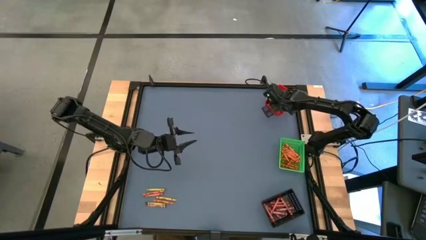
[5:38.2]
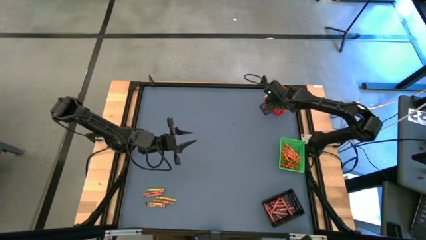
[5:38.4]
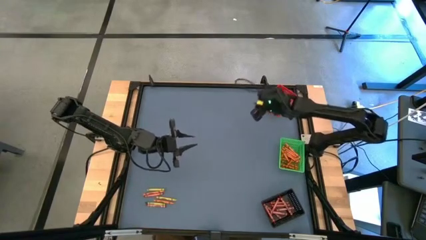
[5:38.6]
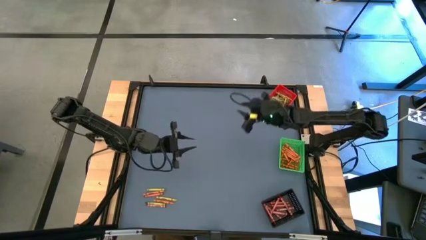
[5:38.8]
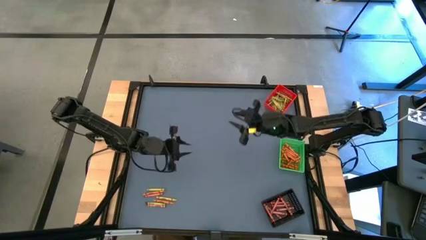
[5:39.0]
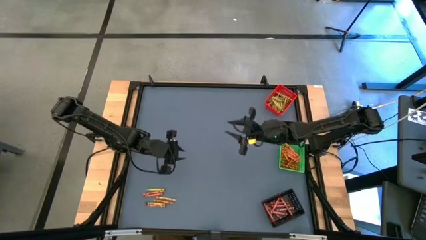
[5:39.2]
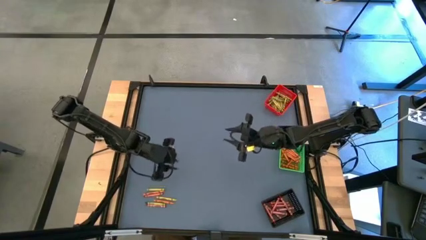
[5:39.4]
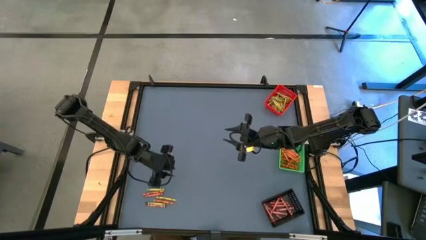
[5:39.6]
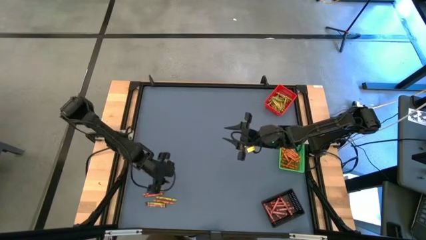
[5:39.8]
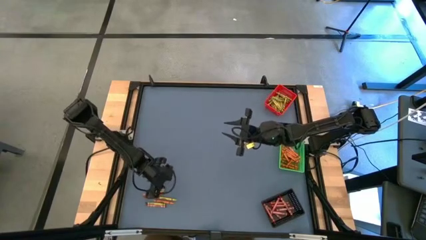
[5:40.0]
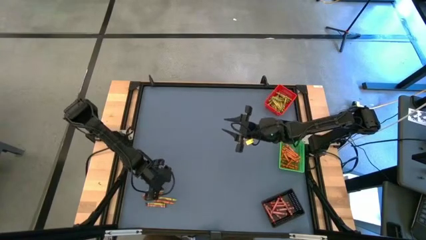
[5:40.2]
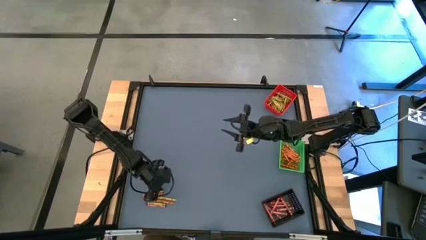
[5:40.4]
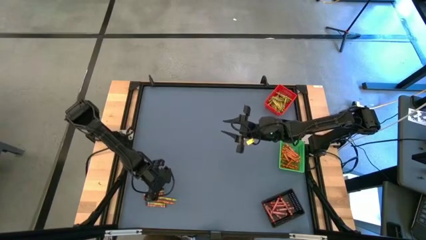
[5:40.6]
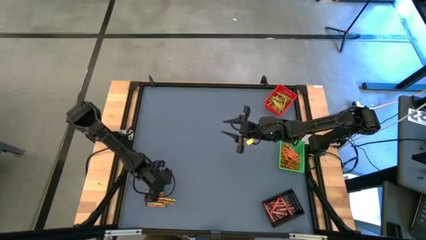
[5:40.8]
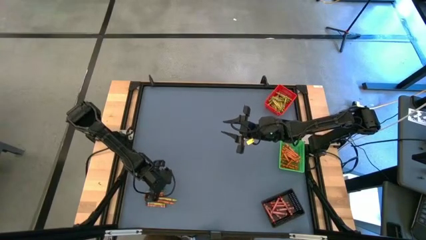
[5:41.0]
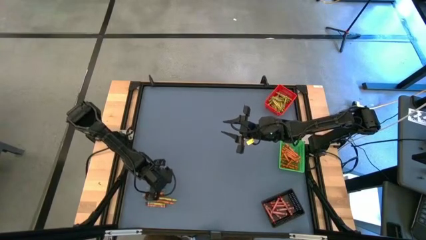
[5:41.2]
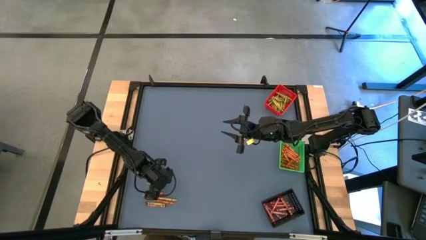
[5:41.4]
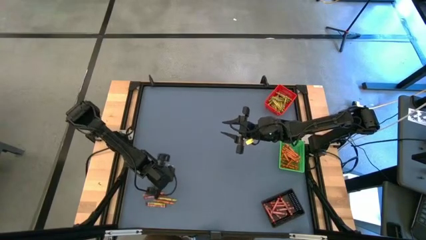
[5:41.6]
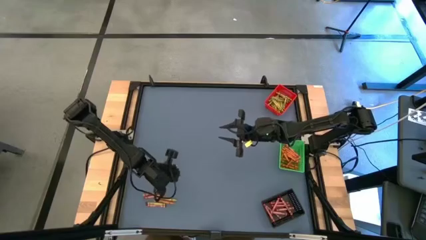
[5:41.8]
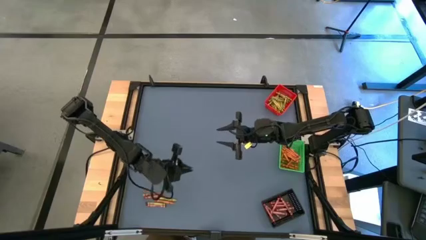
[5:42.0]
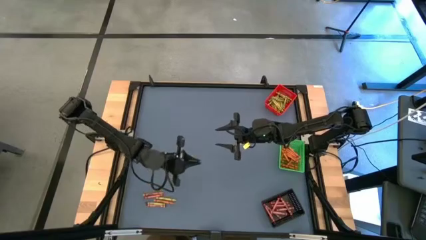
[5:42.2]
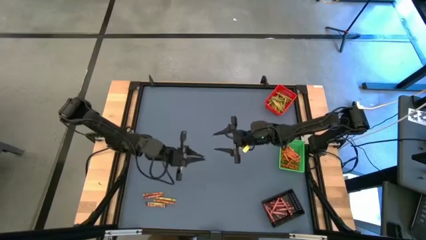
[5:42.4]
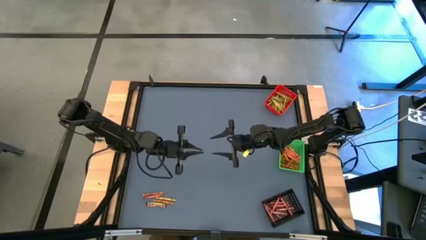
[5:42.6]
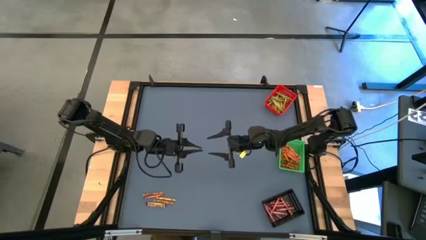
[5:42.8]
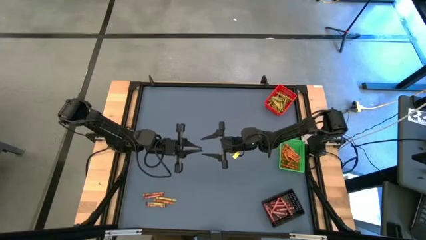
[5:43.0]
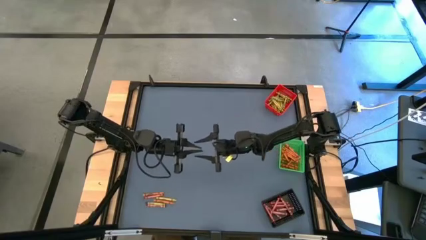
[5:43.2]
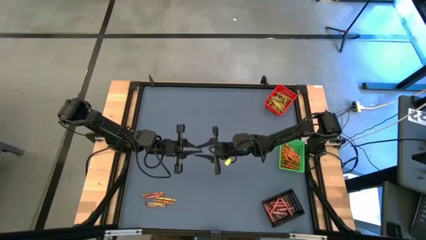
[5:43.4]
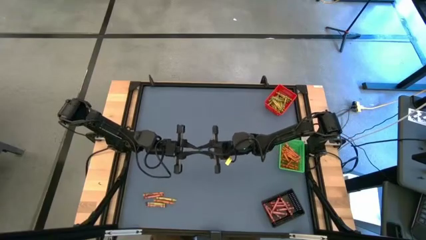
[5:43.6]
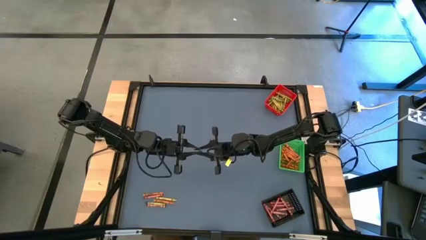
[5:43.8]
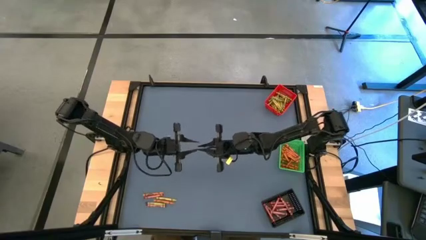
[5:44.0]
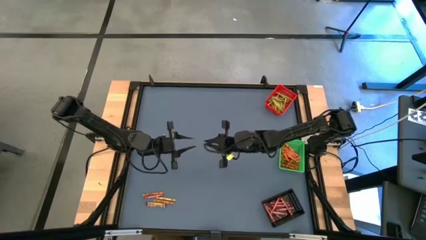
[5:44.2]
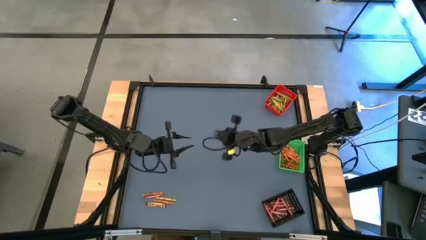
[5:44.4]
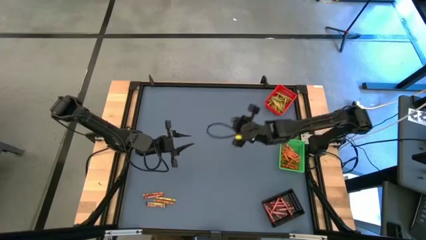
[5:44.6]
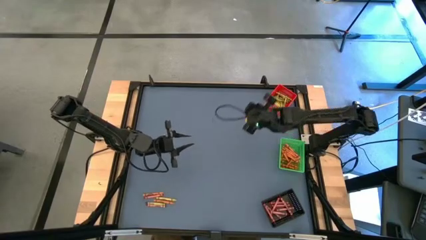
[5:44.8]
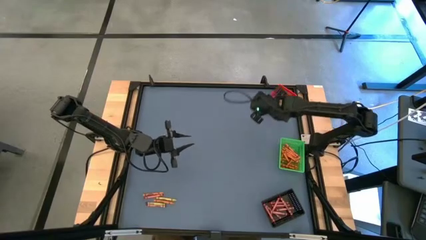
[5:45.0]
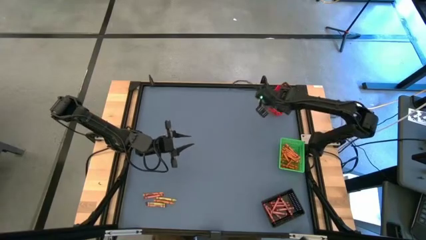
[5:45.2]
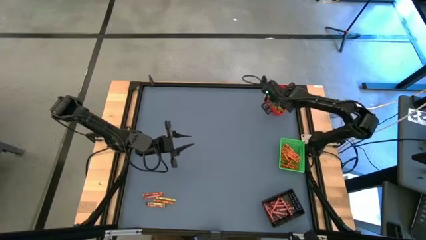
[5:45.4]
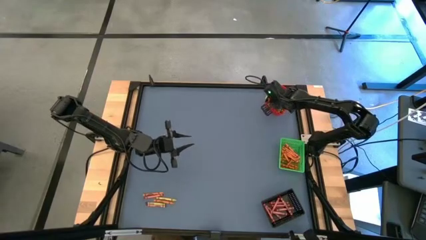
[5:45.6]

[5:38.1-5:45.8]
Task: Sort crayons
Put the green crayon into the red bin

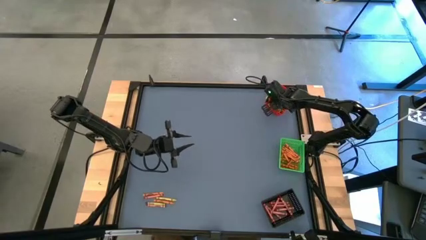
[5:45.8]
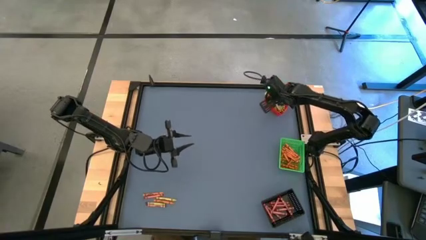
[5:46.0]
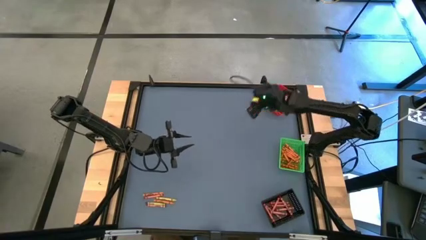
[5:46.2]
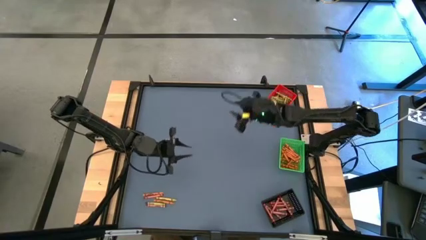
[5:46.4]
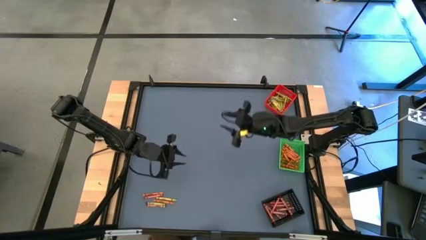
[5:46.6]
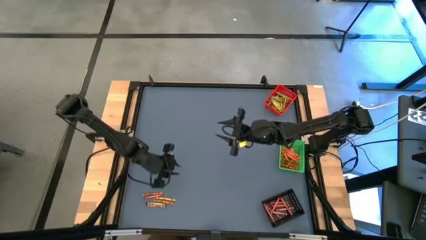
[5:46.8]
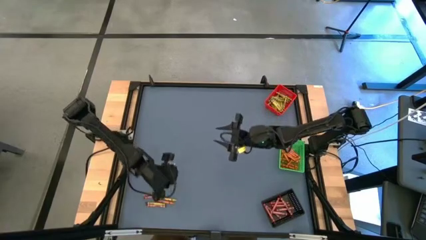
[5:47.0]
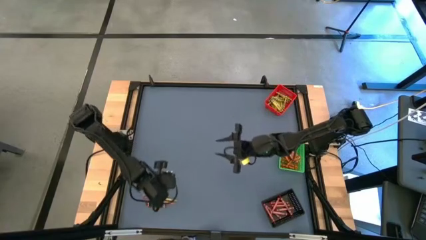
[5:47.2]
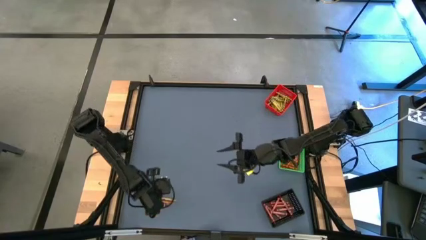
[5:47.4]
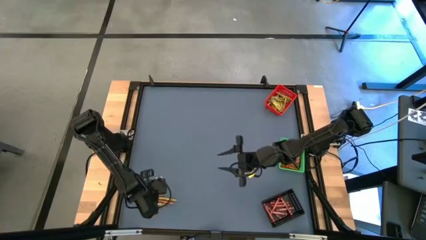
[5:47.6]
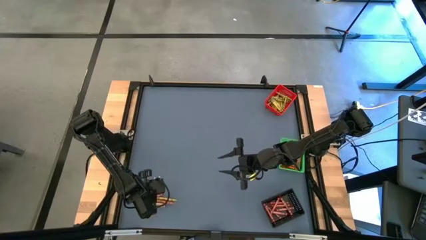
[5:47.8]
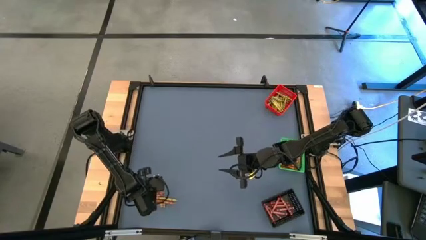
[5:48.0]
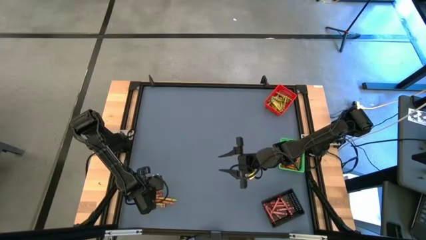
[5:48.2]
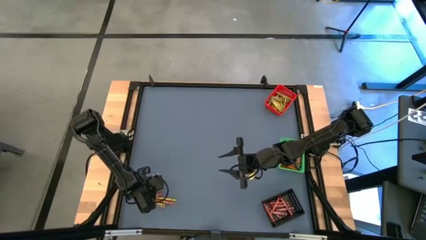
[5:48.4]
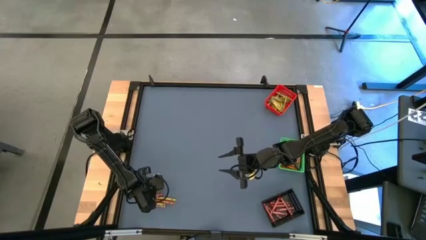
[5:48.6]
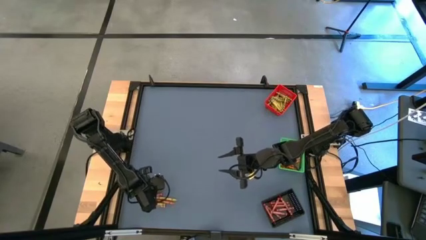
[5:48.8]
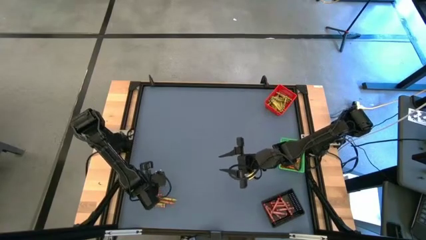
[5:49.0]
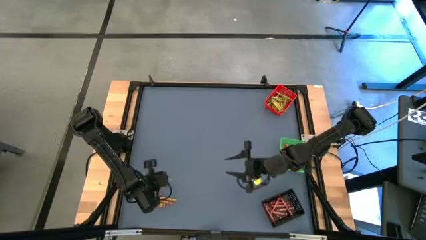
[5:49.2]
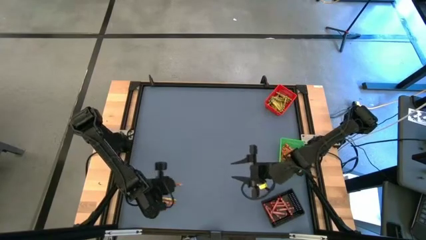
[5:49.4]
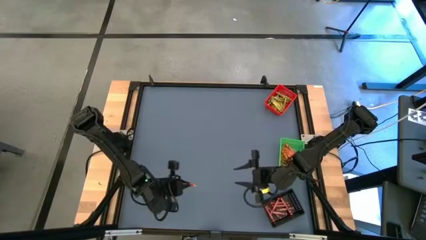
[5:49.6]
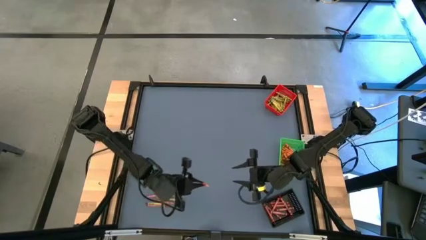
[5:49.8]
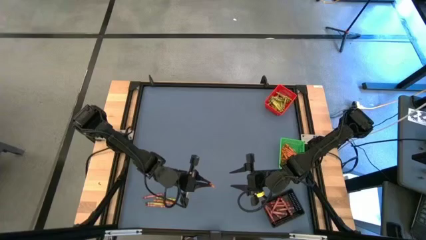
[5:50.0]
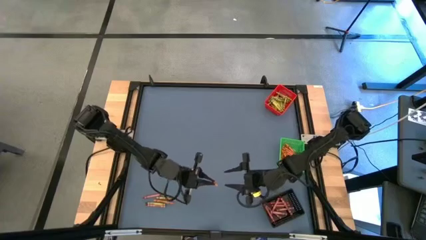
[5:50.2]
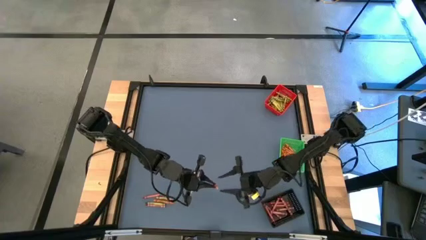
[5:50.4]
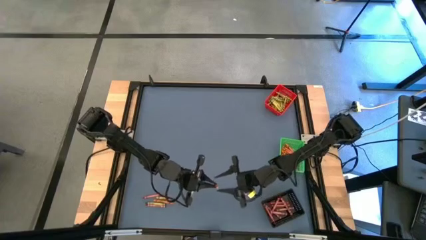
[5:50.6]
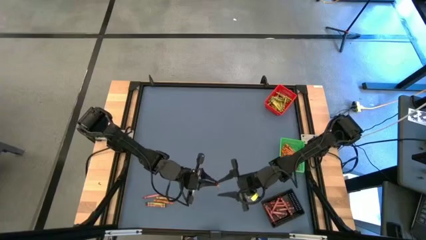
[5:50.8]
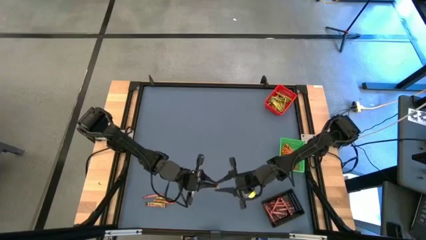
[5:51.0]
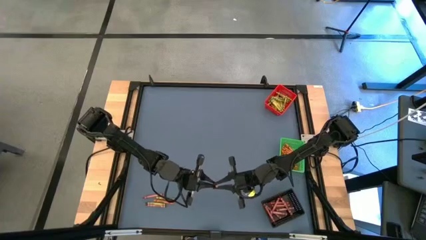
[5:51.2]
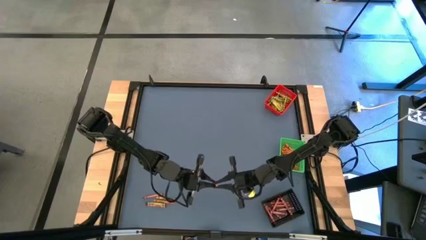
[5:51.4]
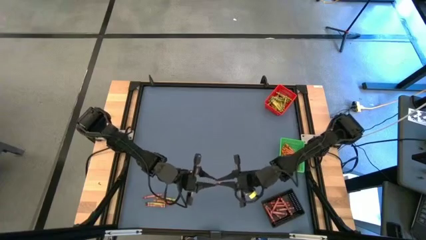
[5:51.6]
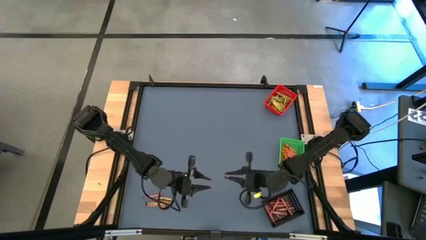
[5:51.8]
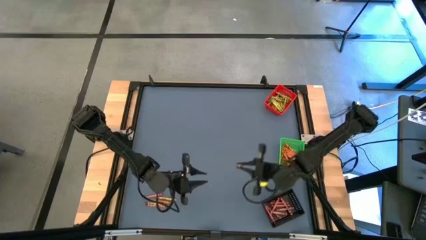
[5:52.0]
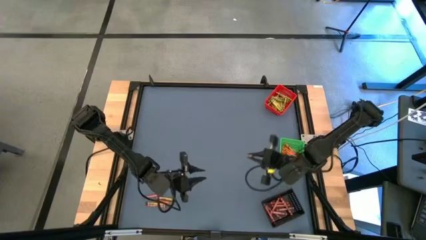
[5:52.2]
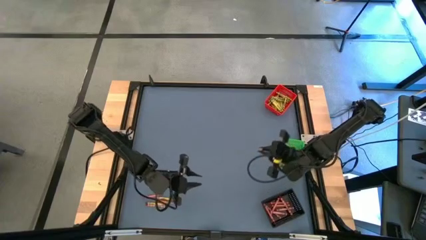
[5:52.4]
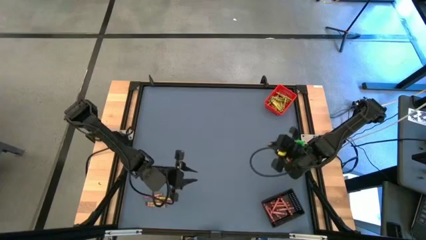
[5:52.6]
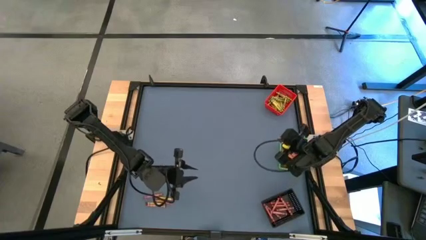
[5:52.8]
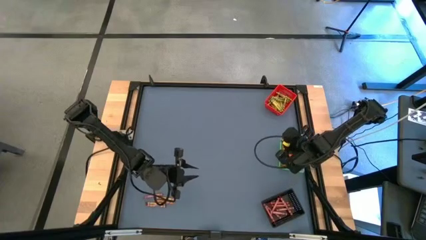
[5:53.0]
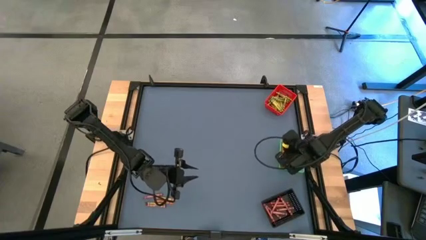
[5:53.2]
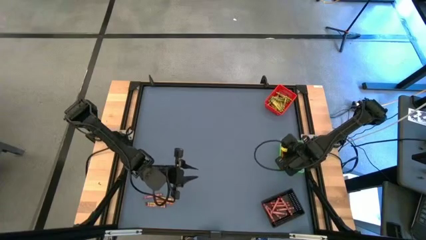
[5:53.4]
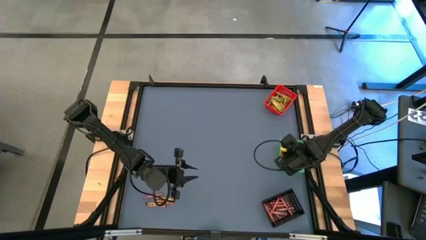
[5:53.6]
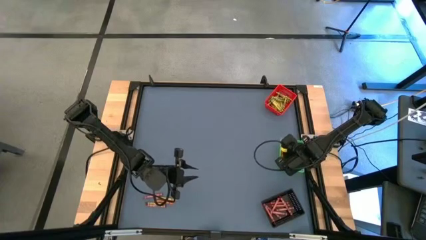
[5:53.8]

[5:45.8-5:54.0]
Put the orange crayon into the green bin
